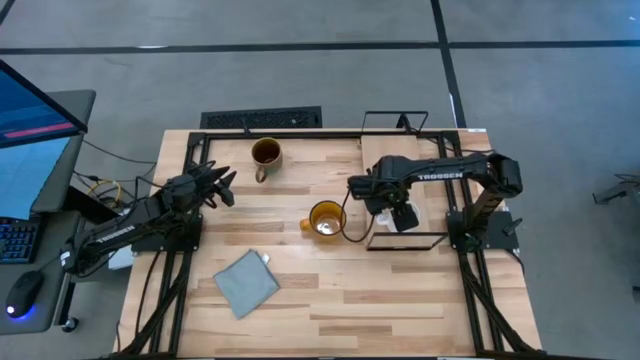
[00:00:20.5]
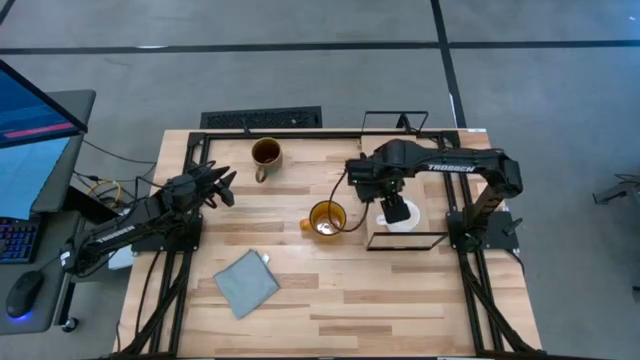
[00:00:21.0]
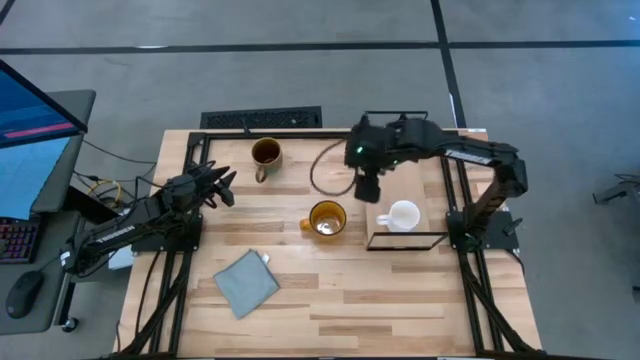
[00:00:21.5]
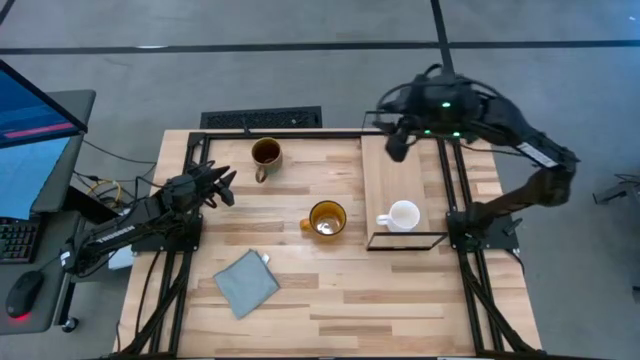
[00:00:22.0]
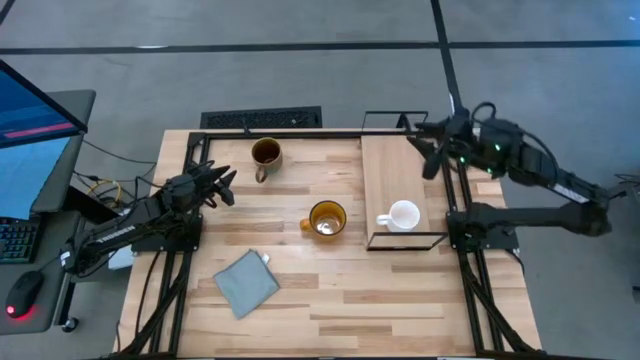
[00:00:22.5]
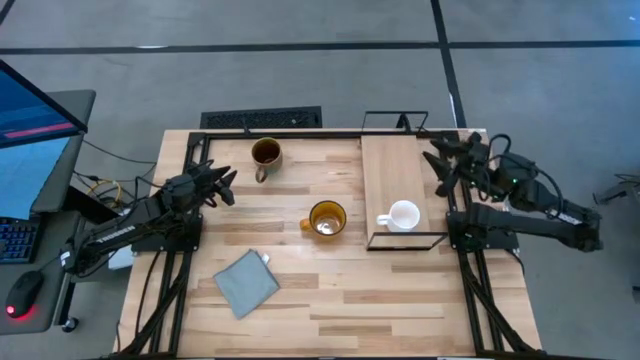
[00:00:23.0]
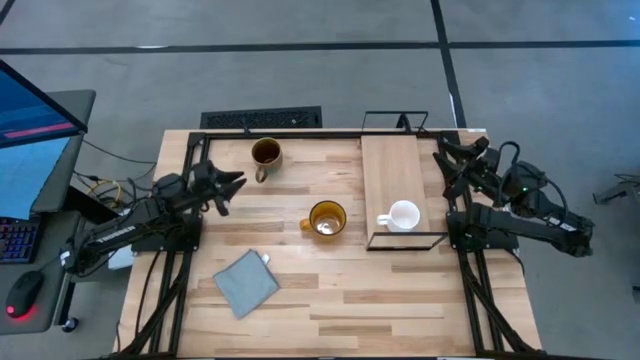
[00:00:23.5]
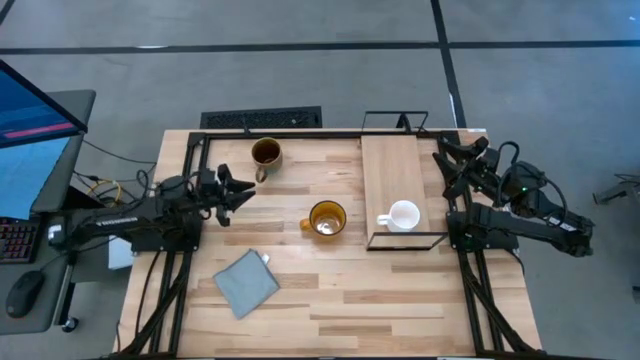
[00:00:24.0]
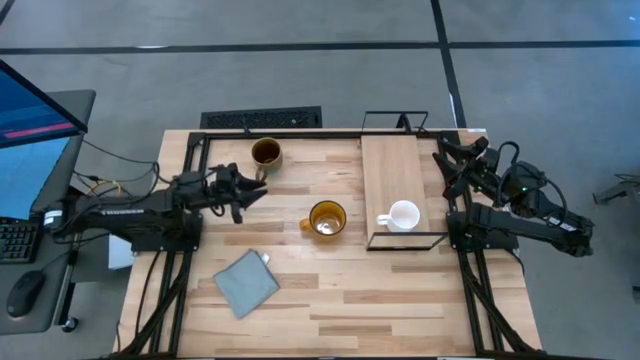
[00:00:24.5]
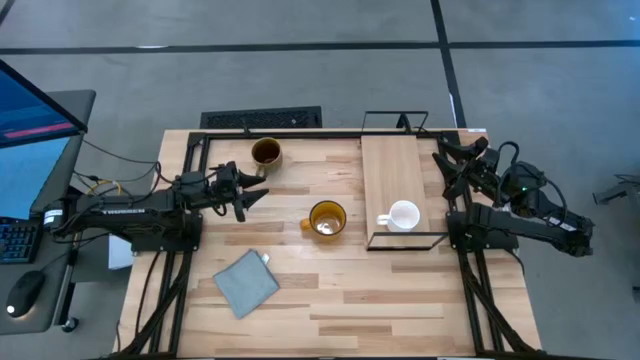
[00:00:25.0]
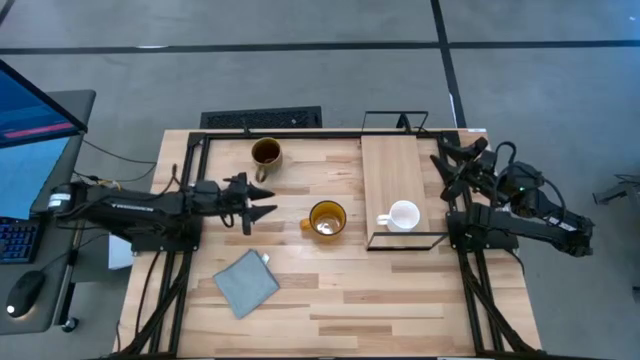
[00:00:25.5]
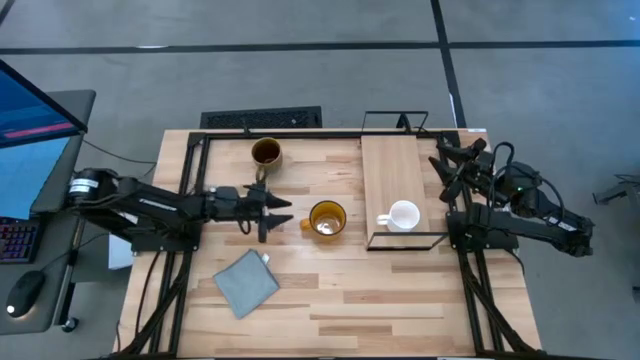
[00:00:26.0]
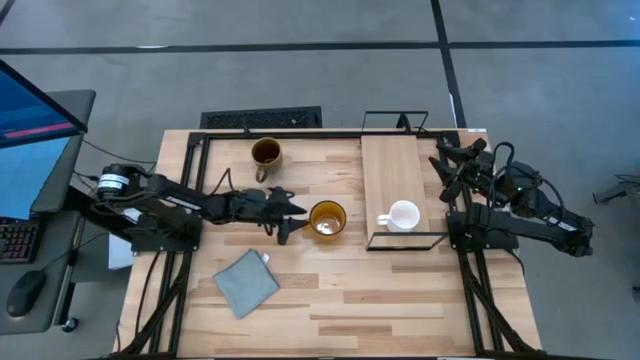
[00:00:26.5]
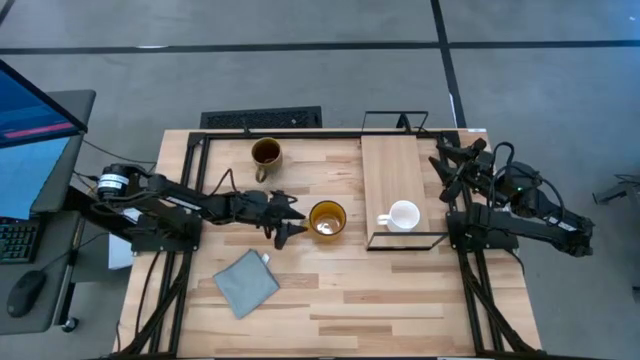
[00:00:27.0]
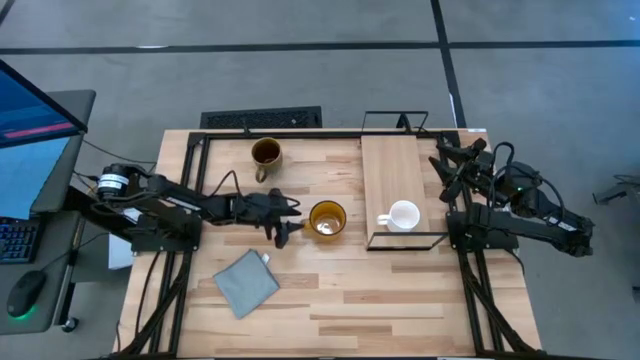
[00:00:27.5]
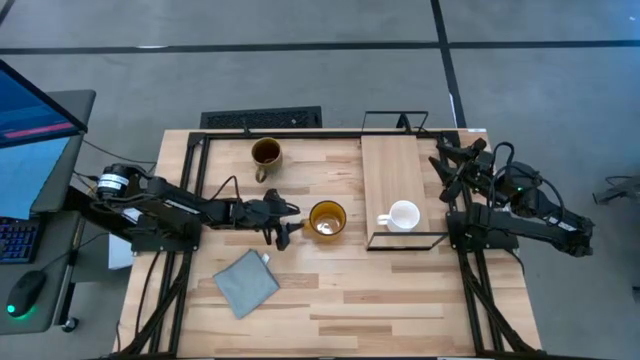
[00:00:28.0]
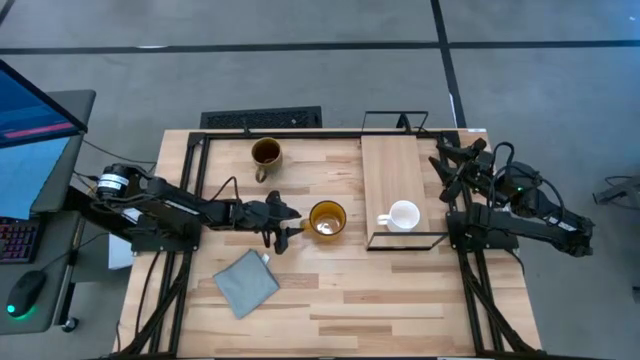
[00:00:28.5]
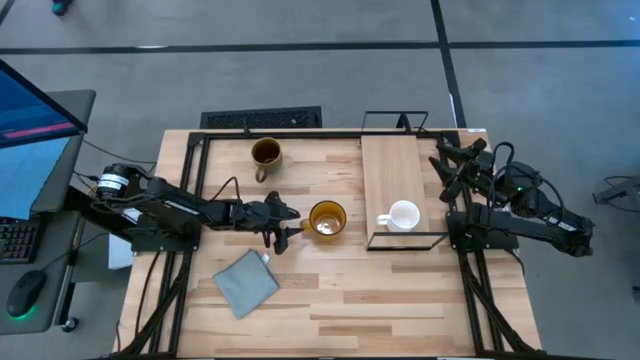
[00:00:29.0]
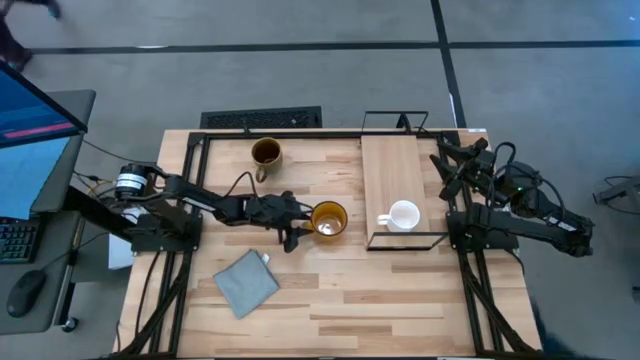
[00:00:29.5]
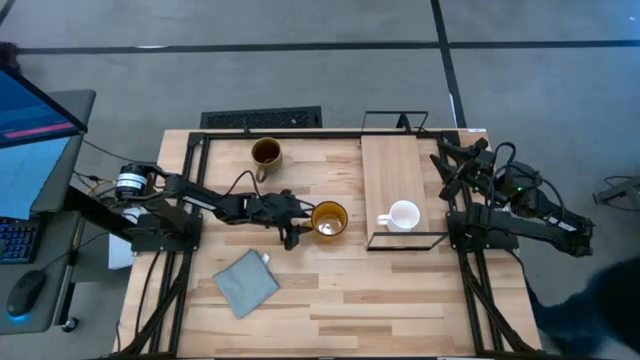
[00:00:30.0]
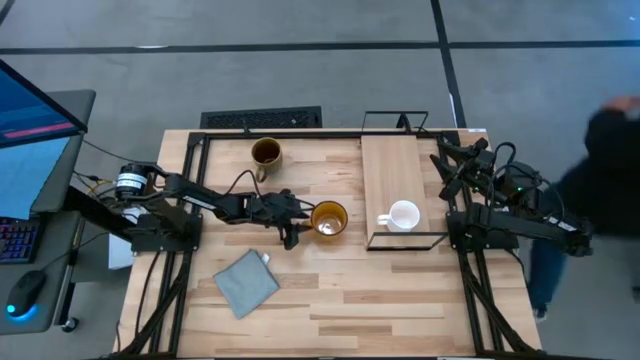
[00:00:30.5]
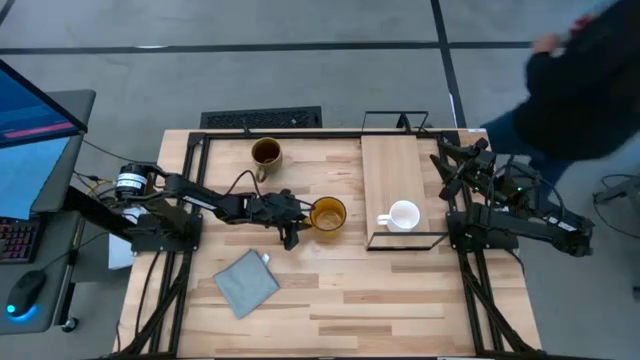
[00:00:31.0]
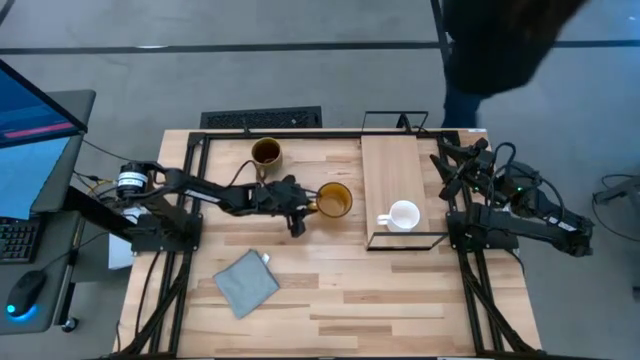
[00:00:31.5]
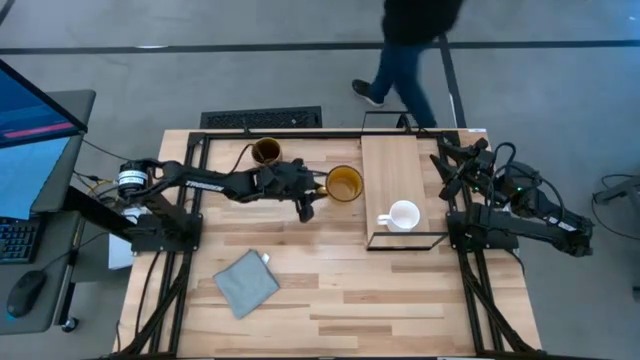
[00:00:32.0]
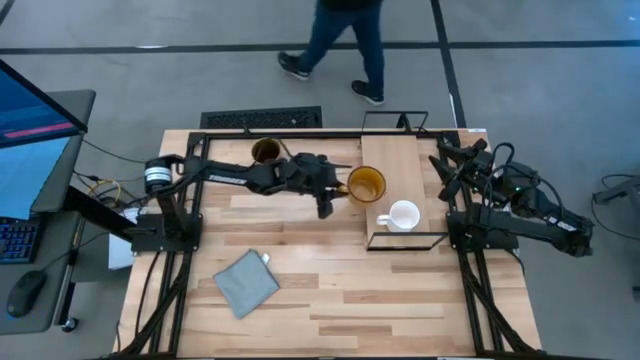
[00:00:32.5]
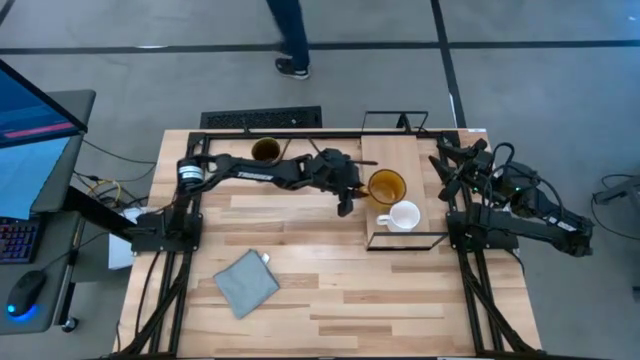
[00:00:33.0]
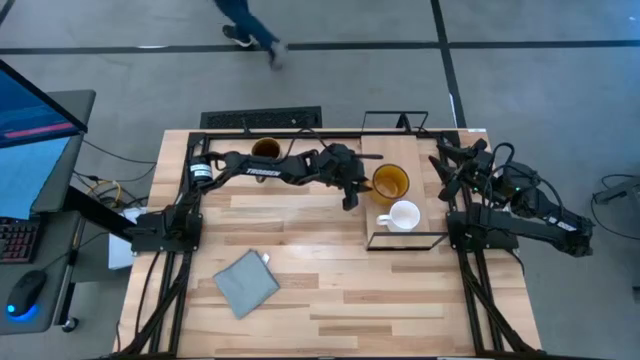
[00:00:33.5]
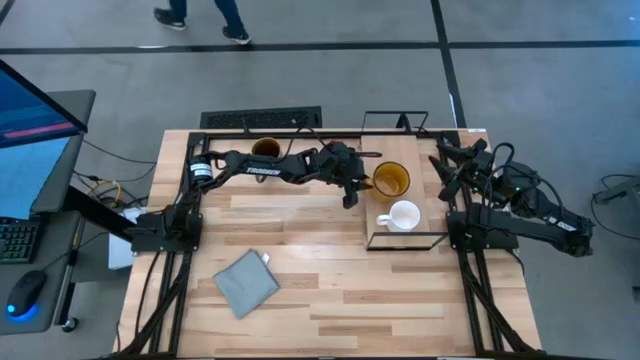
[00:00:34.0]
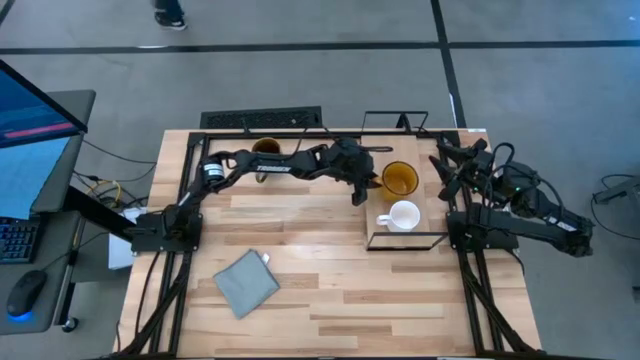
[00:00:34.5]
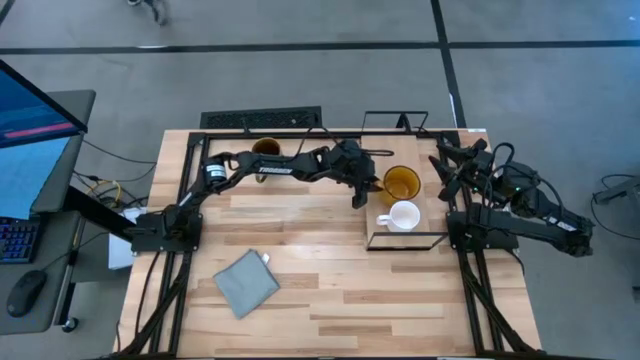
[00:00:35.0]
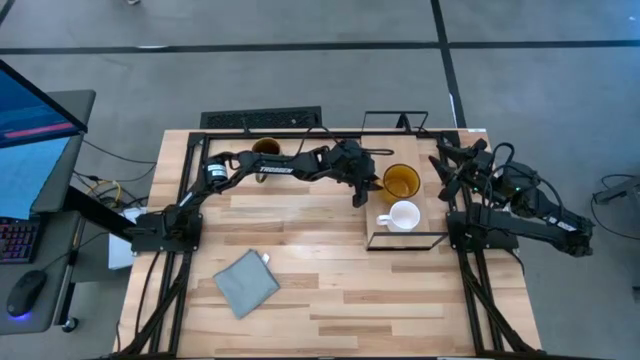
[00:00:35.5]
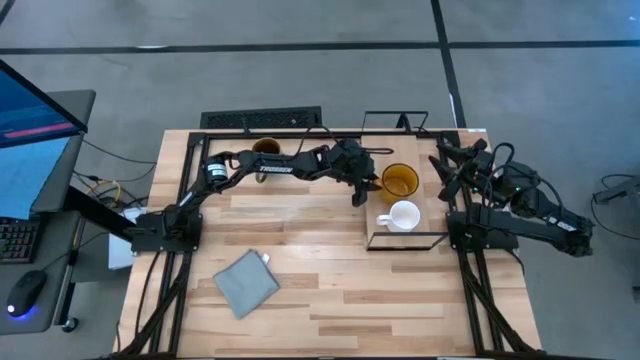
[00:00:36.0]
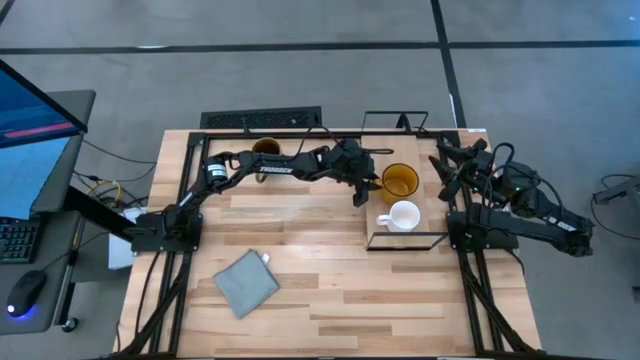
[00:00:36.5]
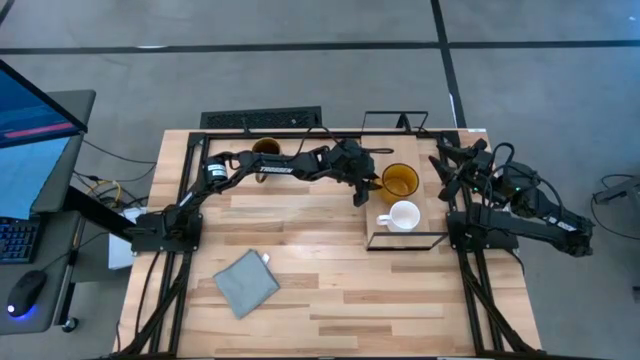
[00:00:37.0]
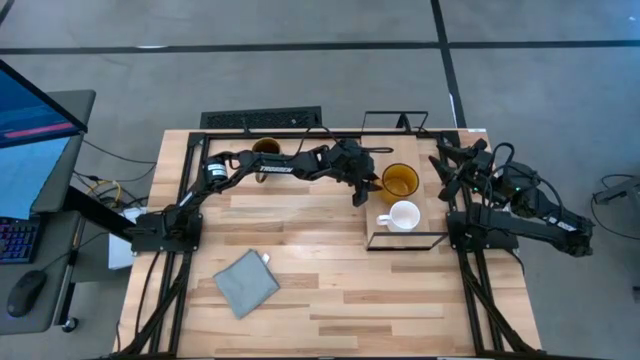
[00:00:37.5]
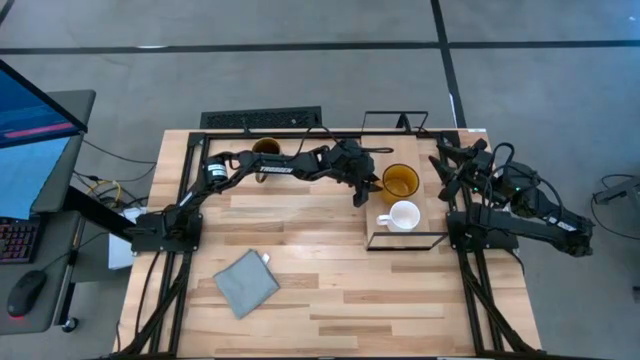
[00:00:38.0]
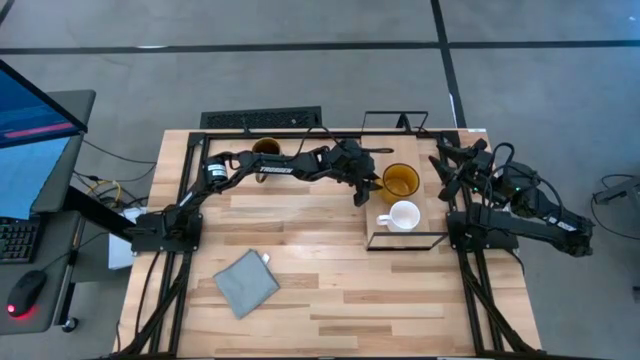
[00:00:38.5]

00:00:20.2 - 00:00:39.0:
Task: Stack small to large cups/mugs on shelf
Put the yellow mug on the shelf
